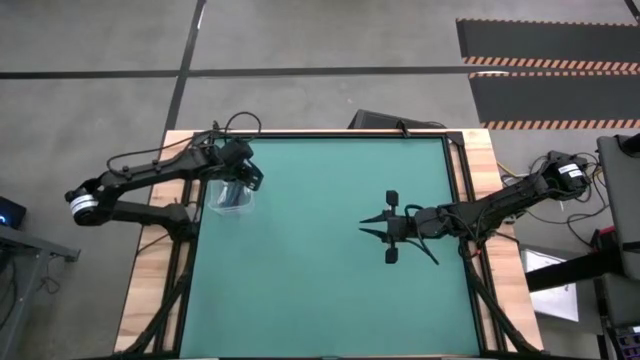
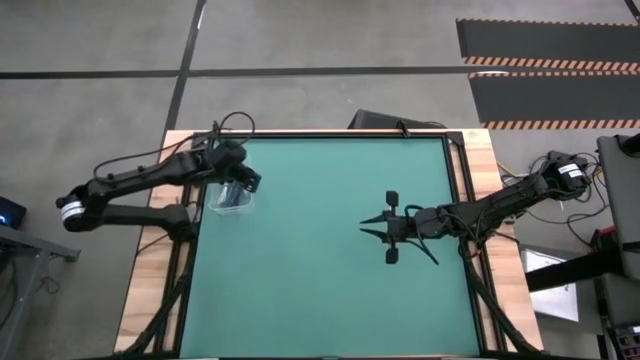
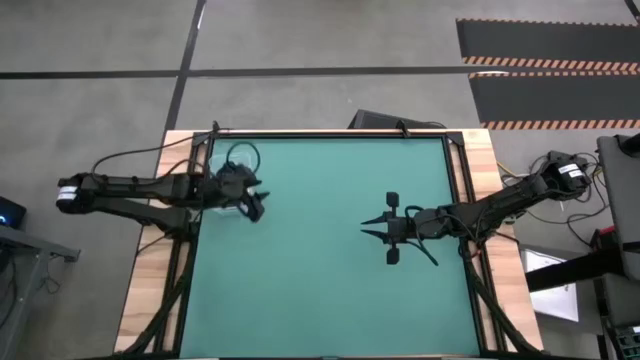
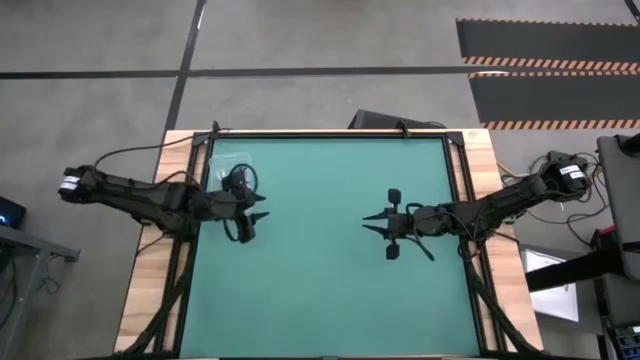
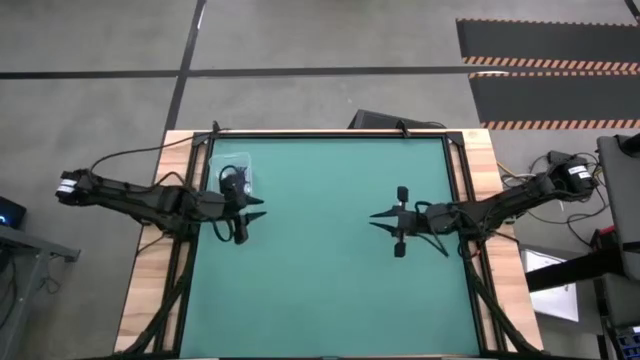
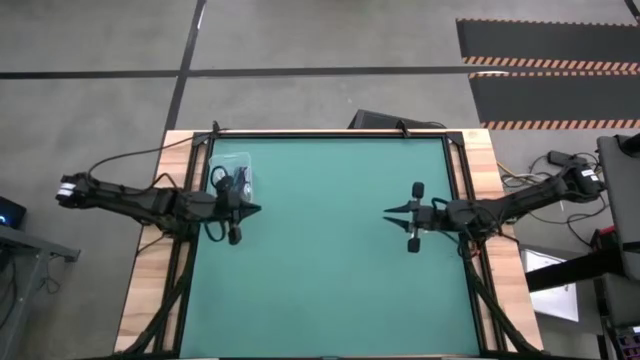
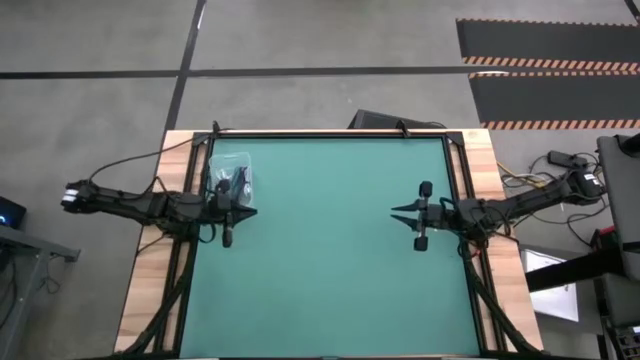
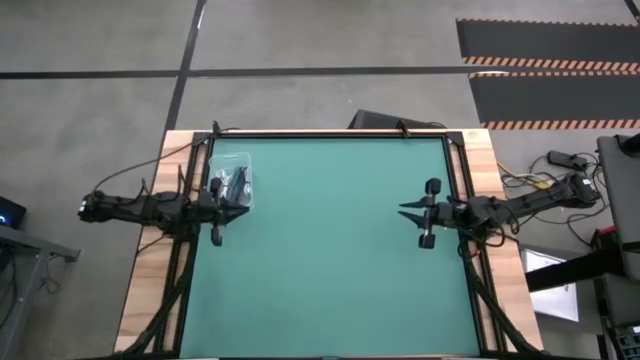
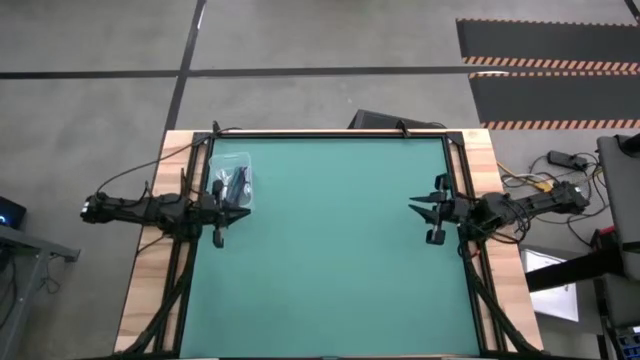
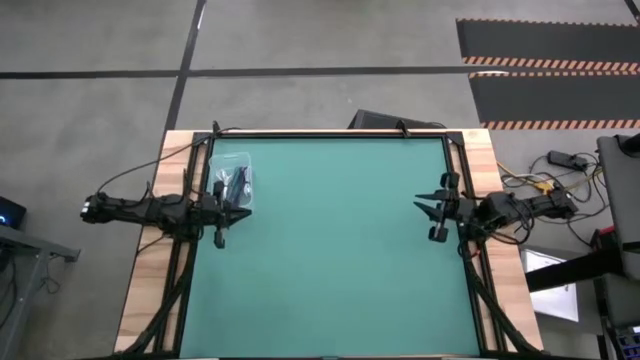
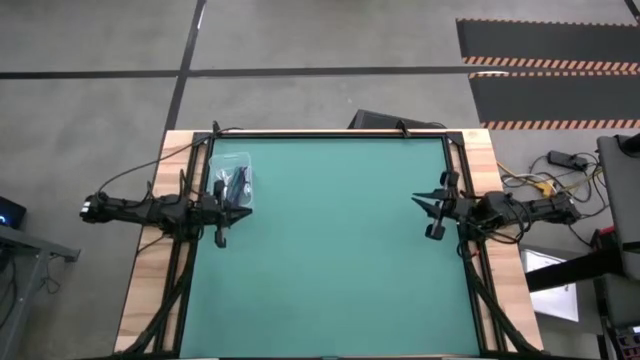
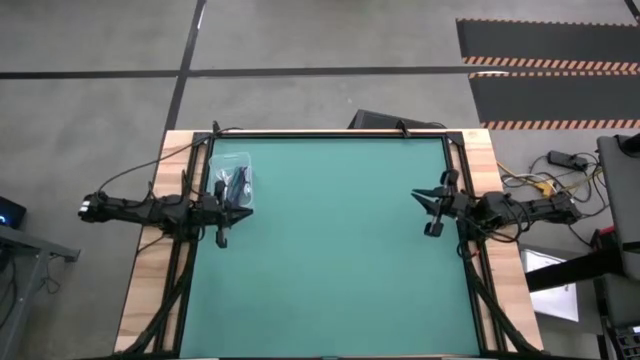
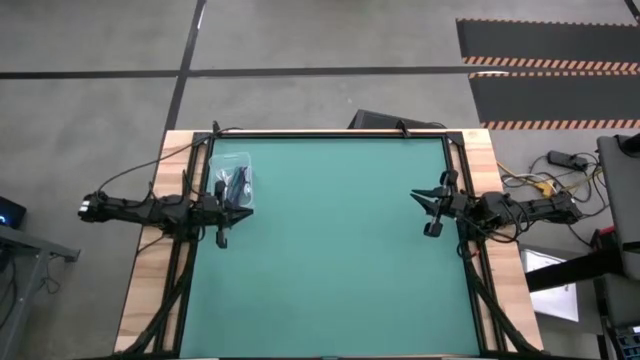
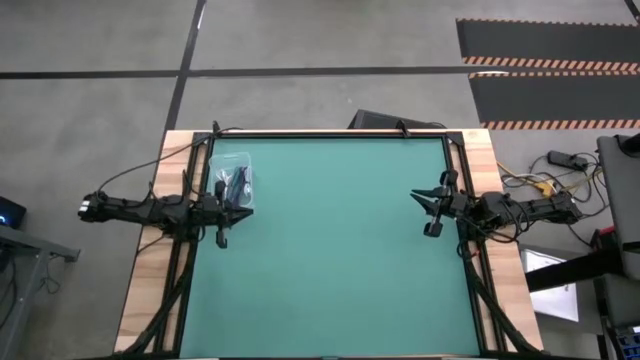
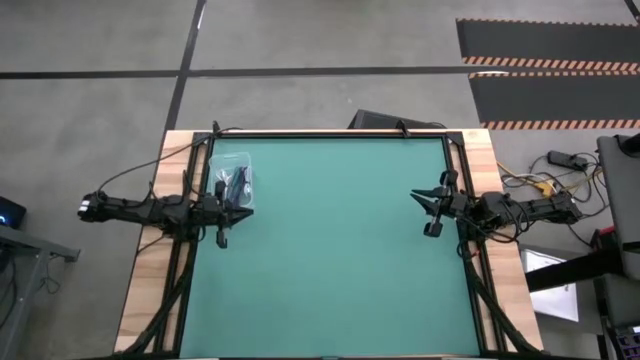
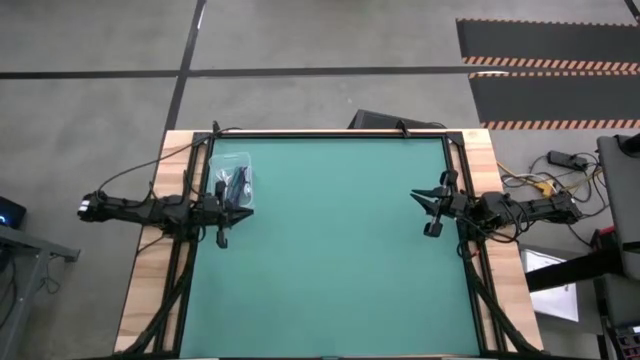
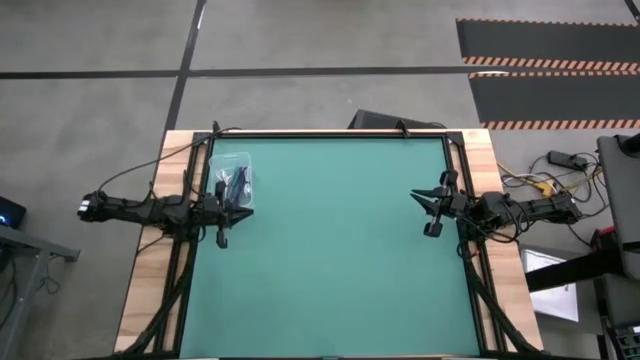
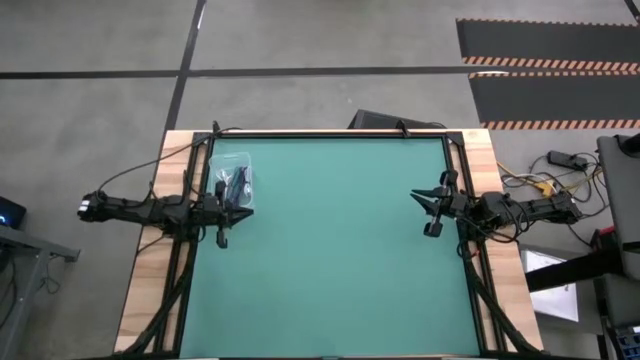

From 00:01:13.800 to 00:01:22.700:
Task: Pick and place USB-C Cables
Return to Home Position

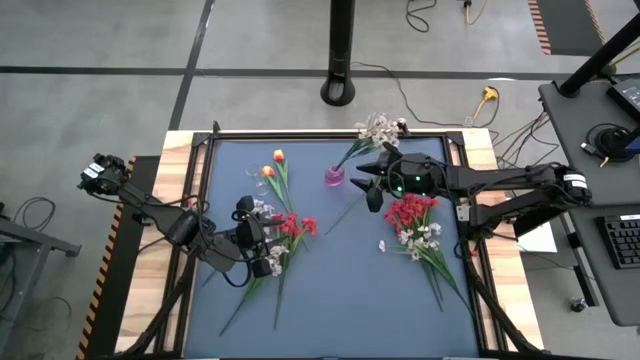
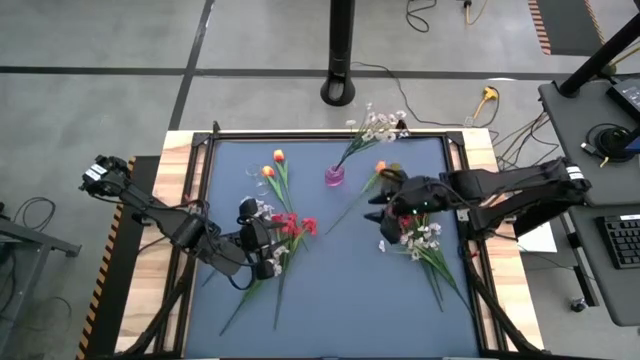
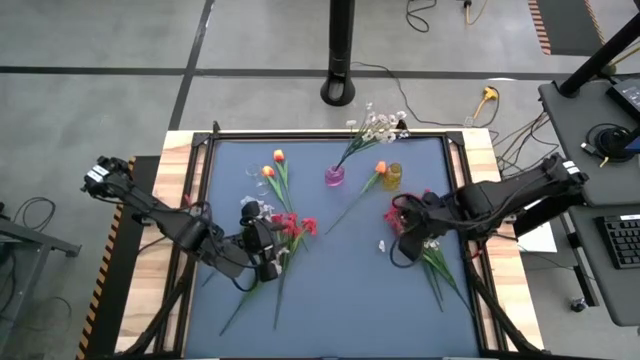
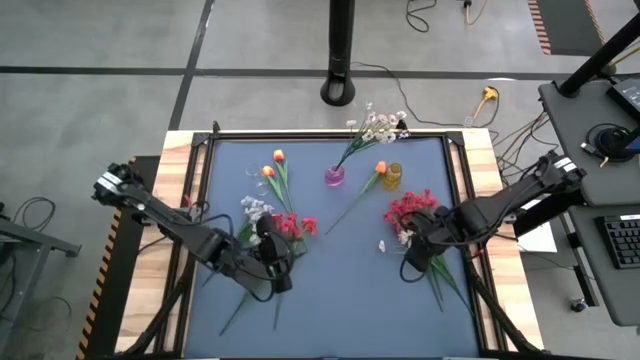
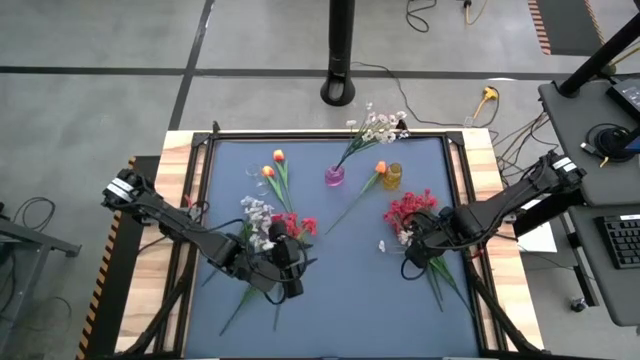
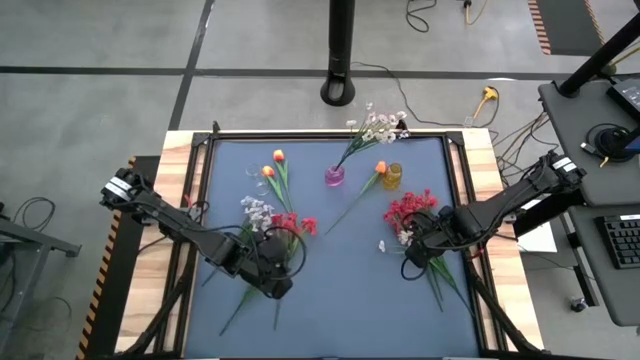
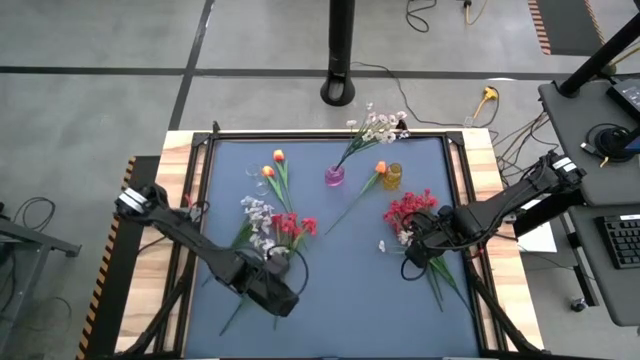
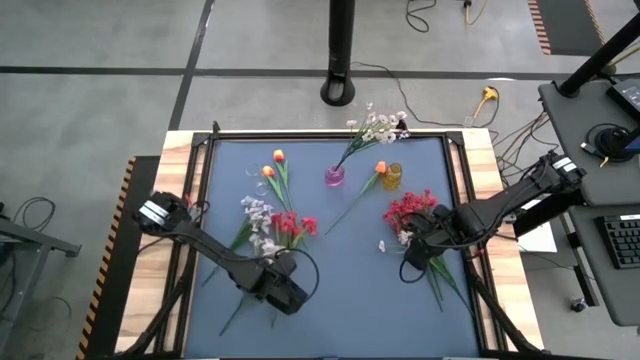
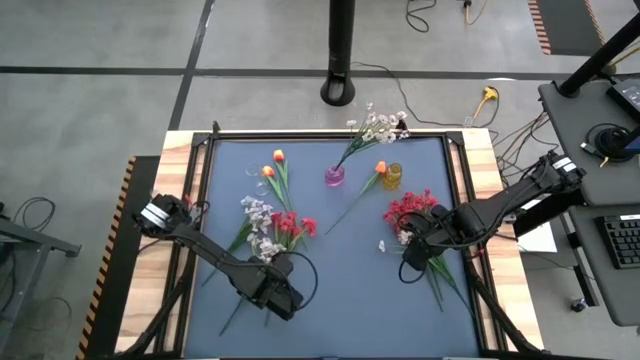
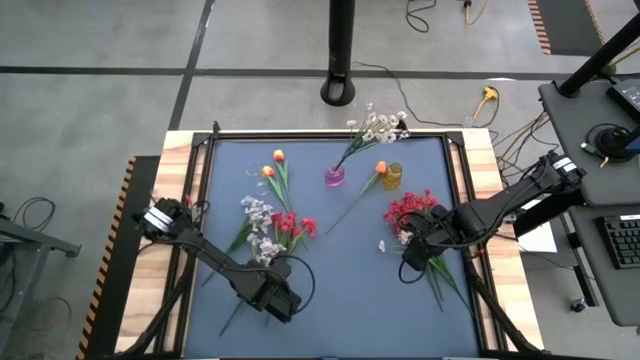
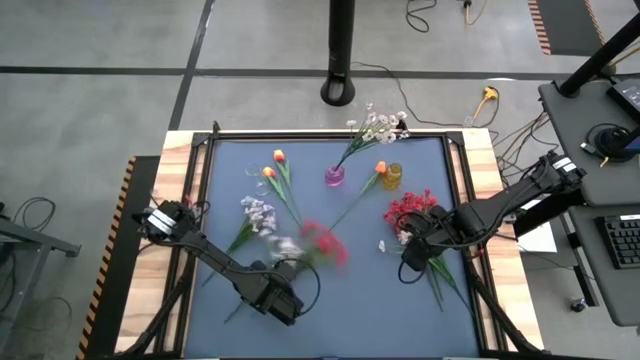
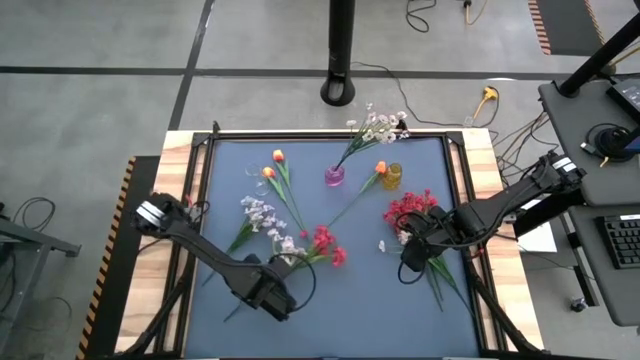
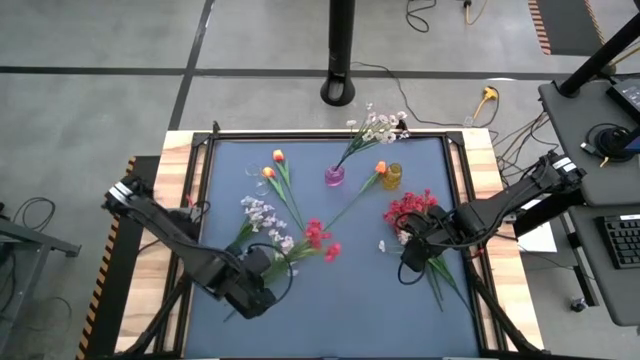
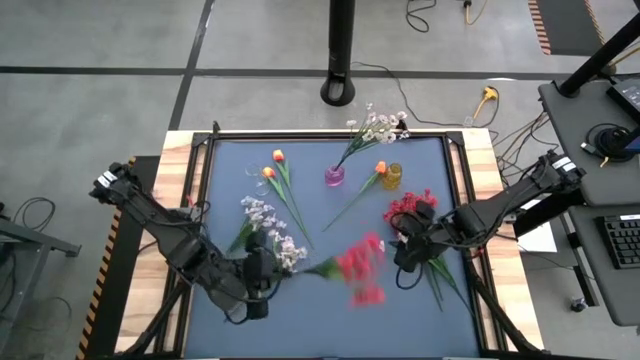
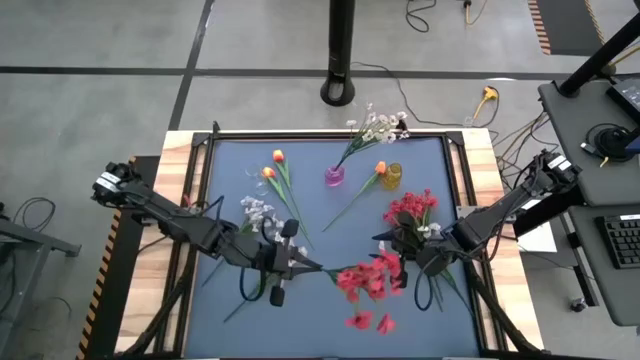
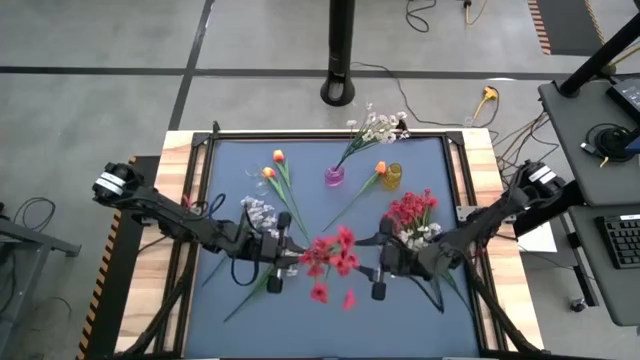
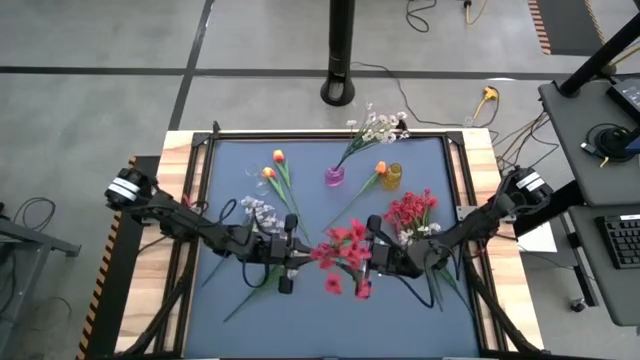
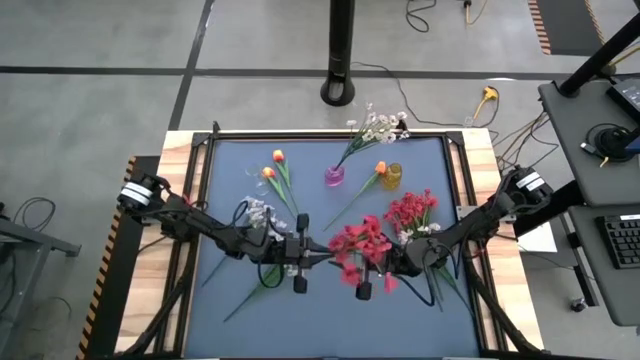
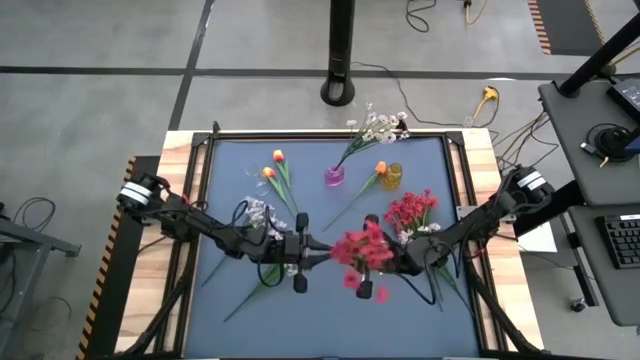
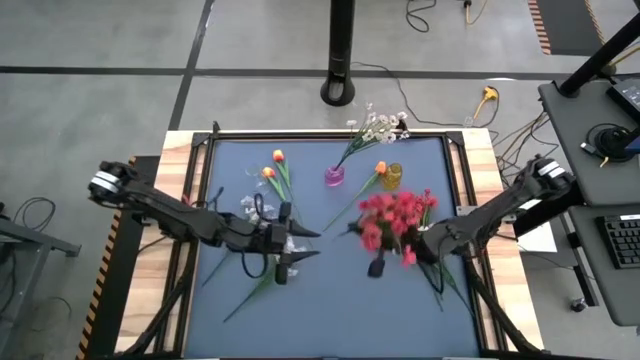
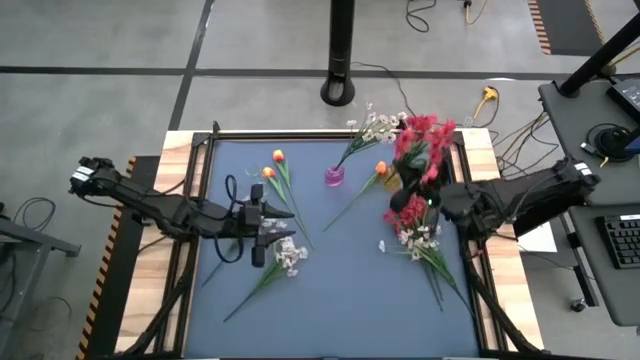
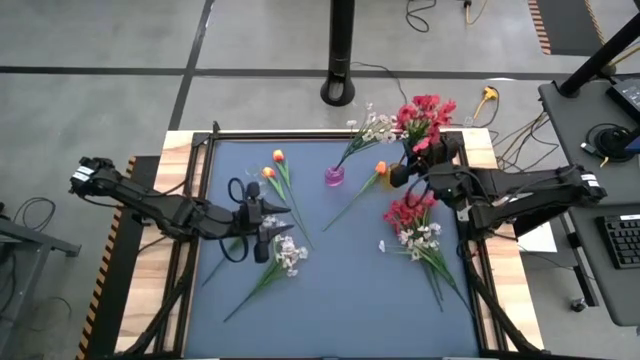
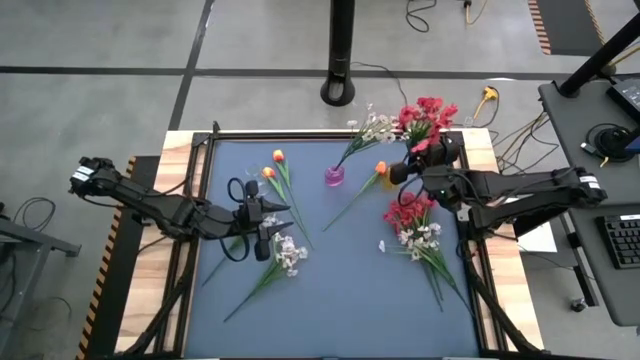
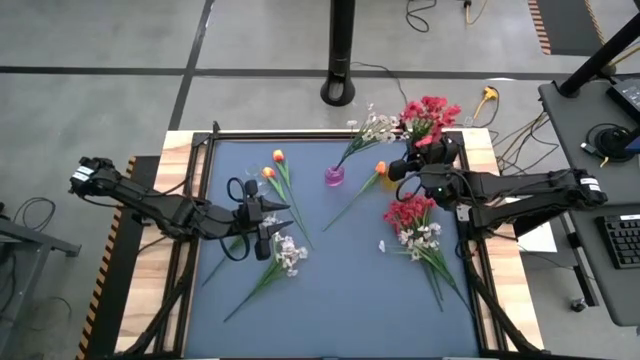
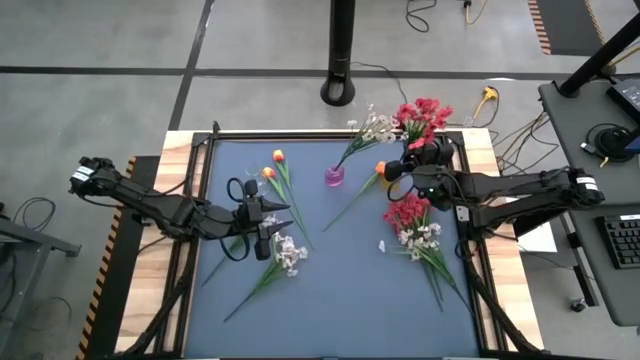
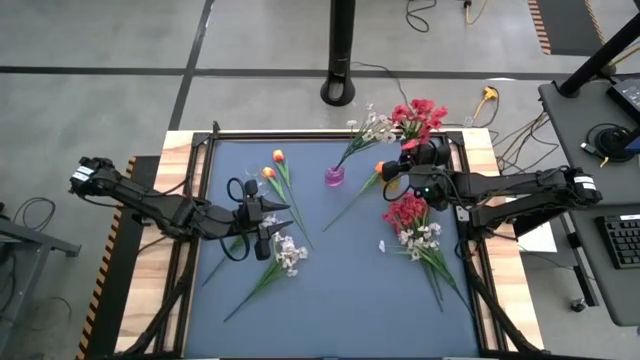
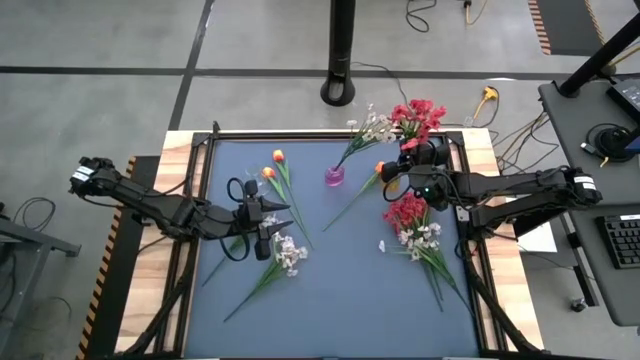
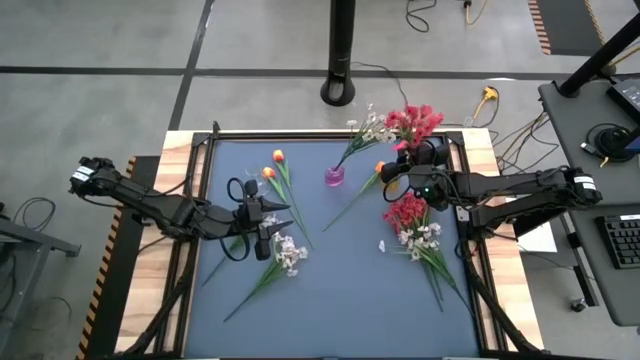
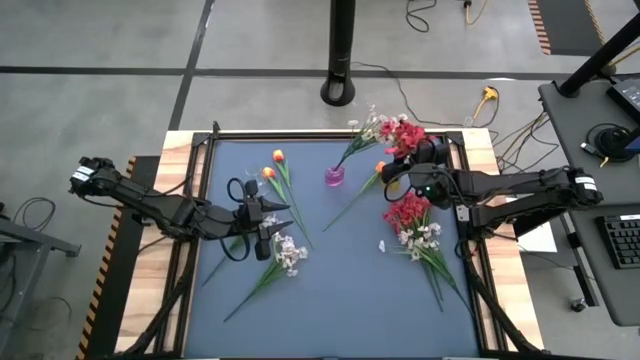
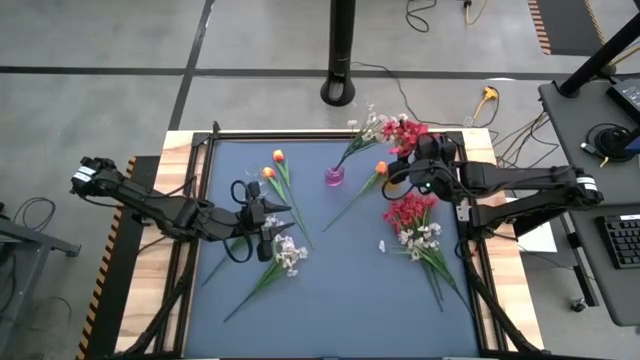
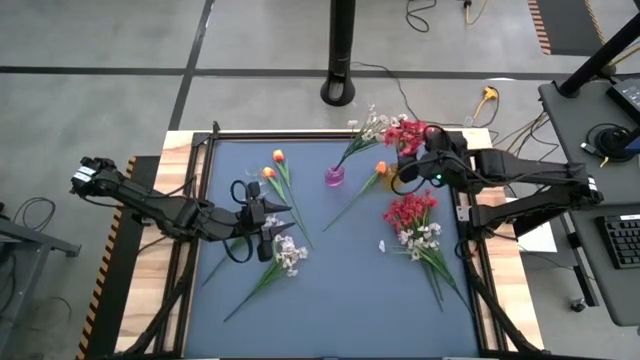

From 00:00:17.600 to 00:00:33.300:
Task: Sort flowers into vase by color
Put the red flowers into the yellow vase
